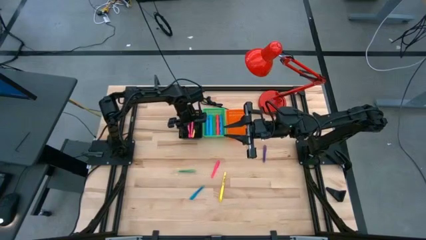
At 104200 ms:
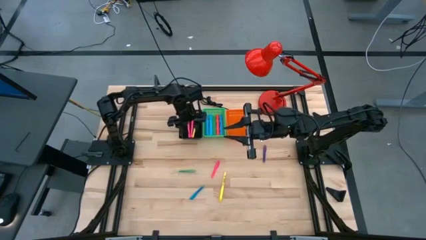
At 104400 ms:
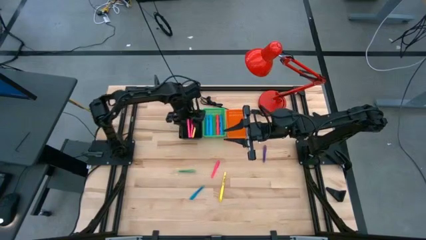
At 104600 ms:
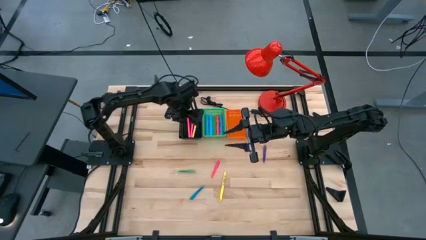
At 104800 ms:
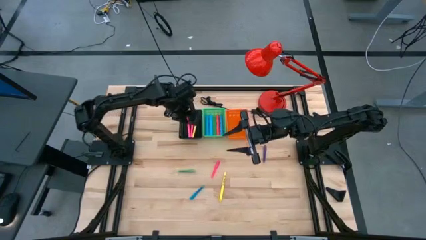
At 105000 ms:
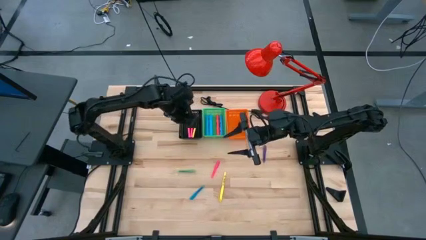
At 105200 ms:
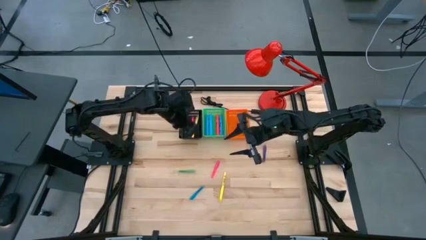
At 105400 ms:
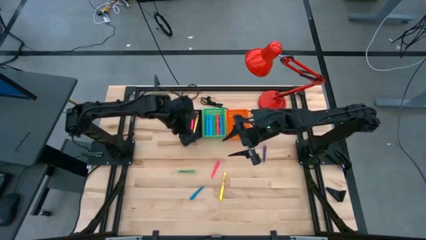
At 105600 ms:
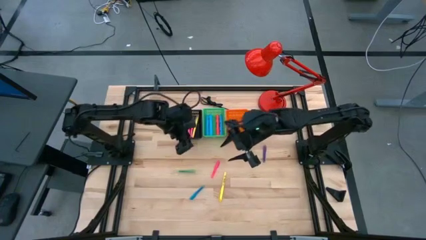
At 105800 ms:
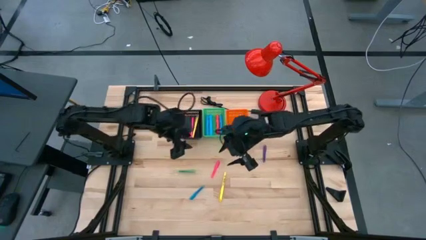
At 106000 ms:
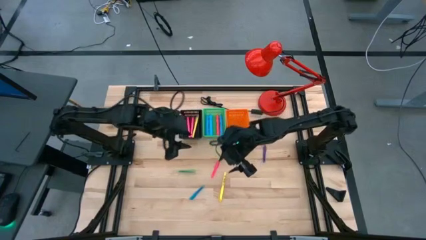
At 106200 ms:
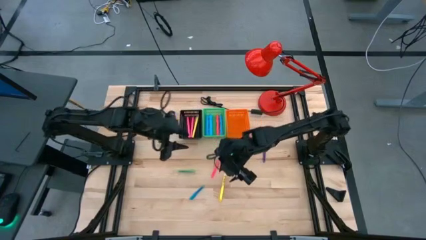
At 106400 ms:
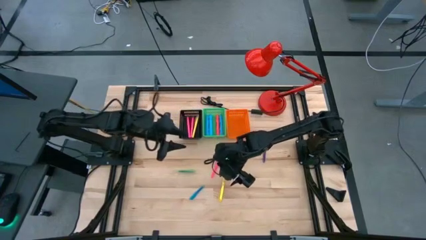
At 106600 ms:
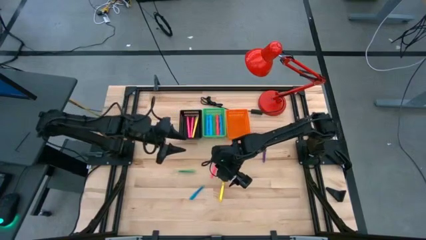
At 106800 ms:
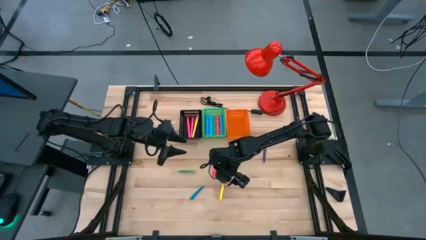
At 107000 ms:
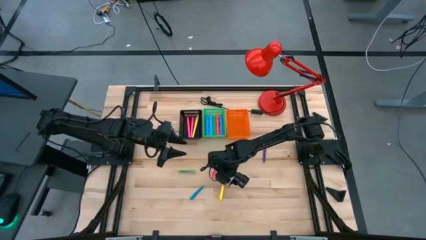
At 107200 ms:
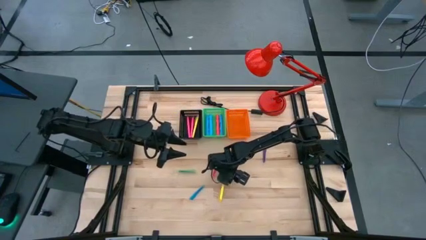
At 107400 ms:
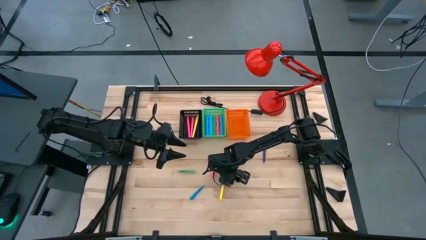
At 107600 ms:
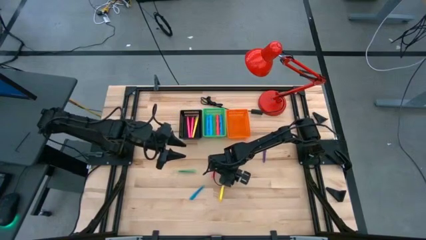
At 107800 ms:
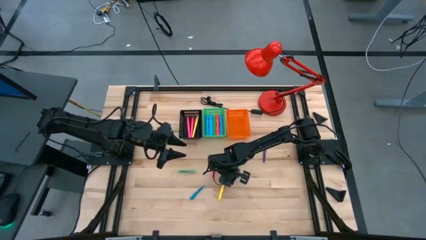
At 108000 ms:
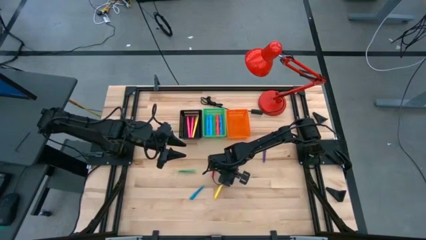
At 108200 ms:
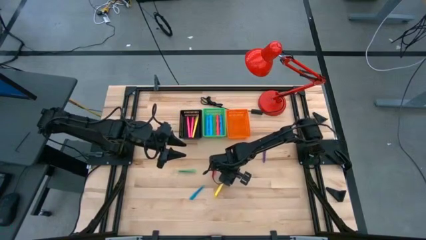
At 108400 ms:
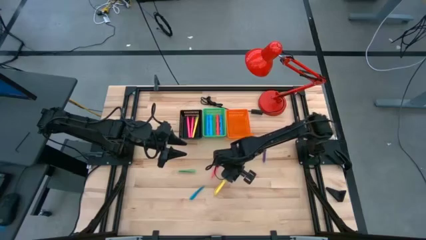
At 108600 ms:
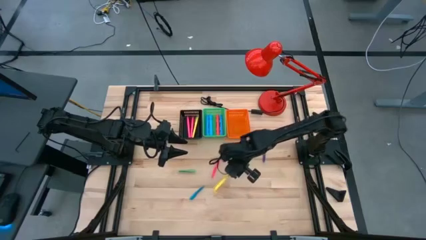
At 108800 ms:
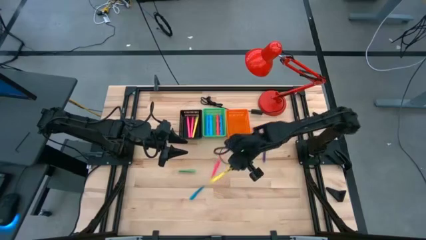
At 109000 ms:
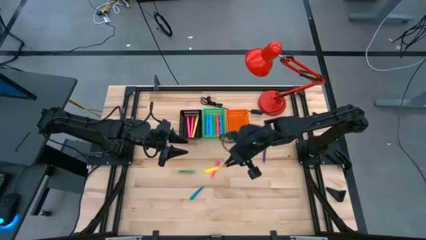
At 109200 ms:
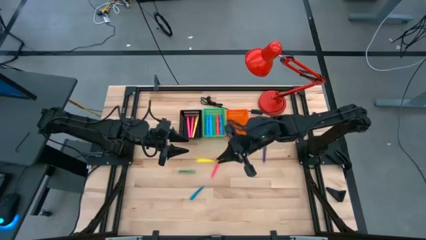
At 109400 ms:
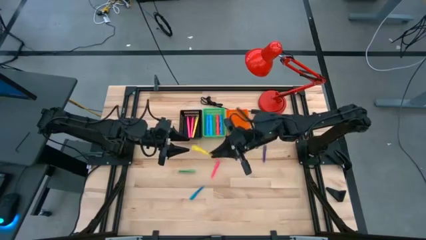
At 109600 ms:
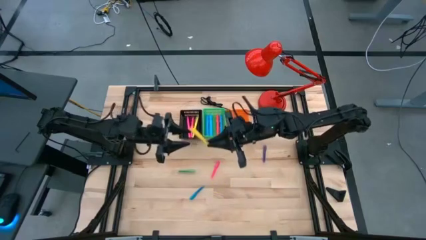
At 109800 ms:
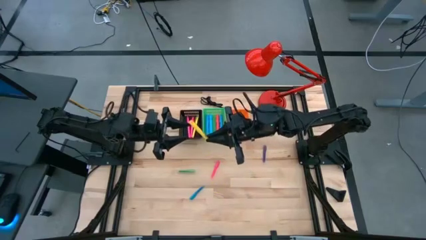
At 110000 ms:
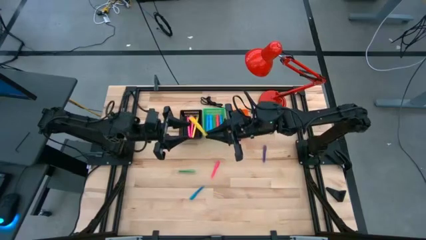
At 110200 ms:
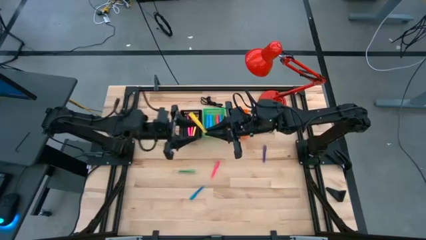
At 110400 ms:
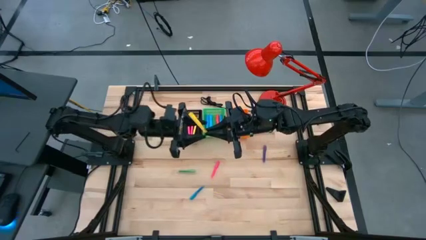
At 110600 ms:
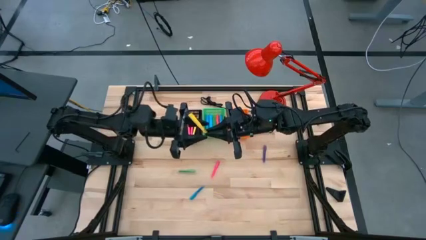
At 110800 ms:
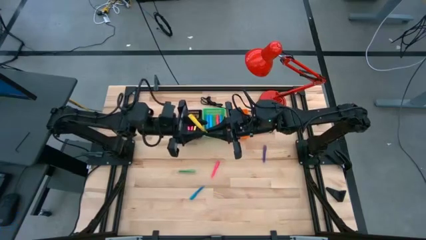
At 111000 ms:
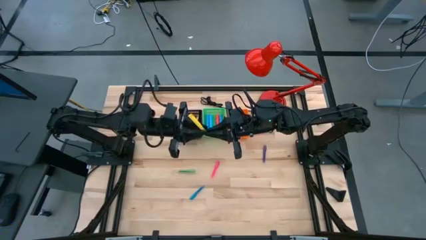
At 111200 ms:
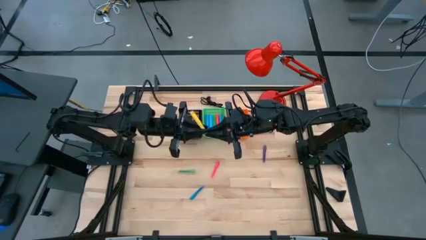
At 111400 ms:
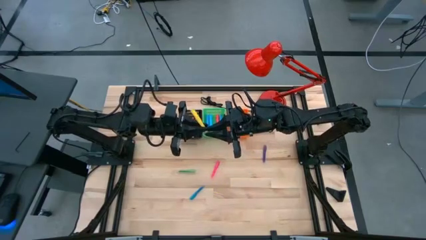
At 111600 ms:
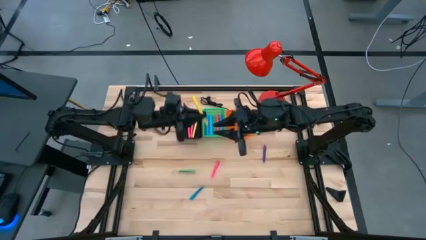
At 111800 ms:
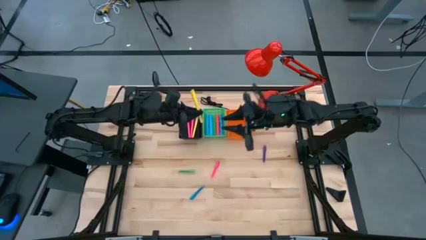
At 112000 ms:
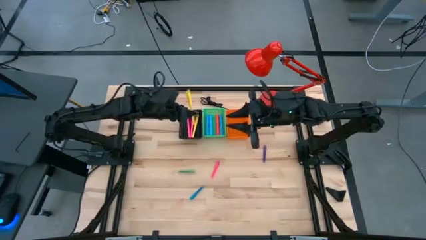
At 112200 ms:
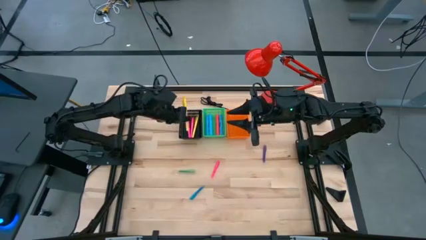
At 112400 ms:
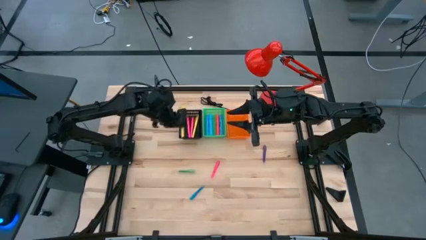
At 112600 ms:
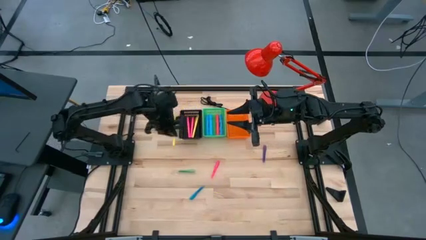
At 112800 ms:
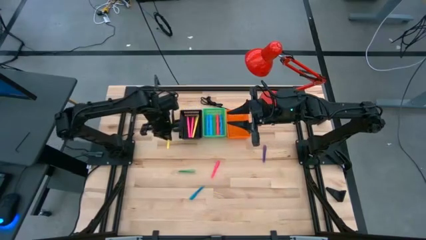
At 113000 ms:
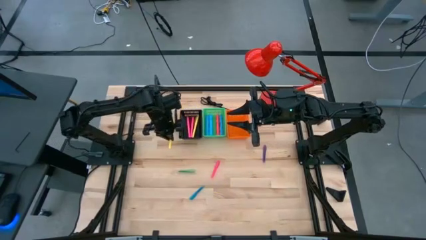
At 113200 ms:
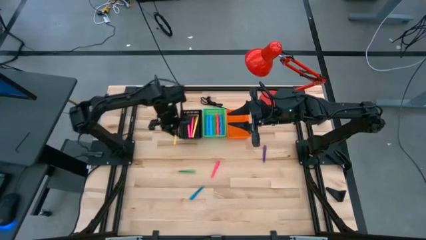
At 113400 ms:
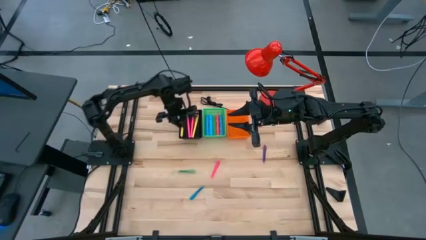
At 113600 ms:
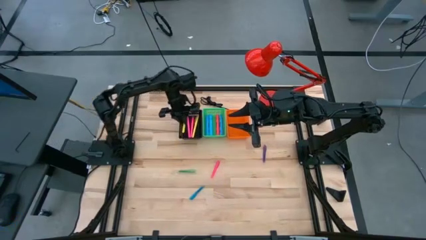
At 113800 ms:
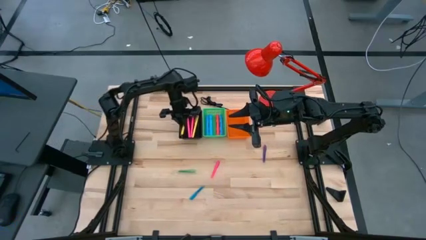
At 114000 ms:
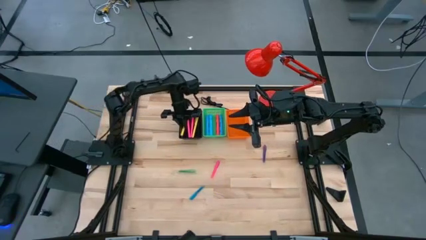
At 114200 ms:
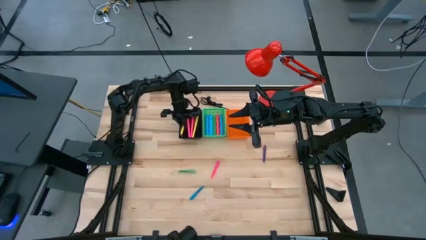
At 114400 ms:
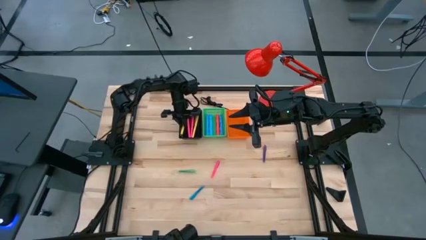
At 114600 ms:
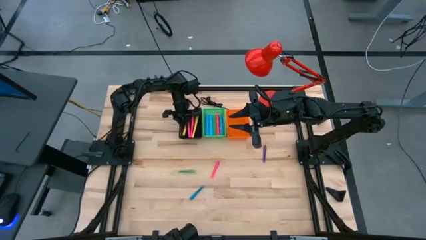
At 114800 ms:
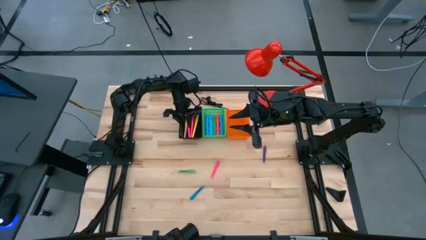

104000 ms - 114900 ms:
Task: Pick & Place Markers
Put the large yellow pen into the black bin

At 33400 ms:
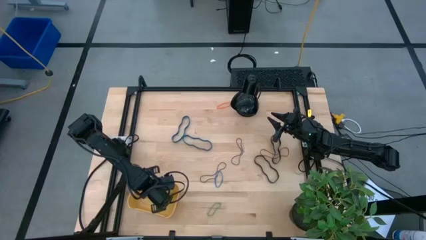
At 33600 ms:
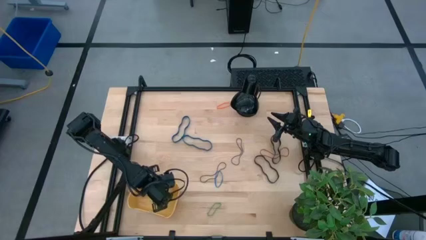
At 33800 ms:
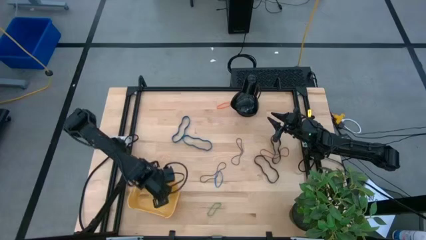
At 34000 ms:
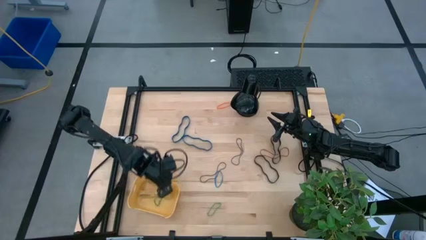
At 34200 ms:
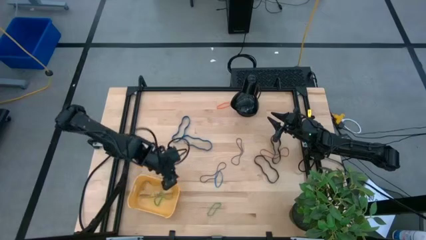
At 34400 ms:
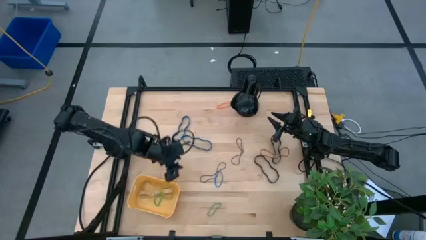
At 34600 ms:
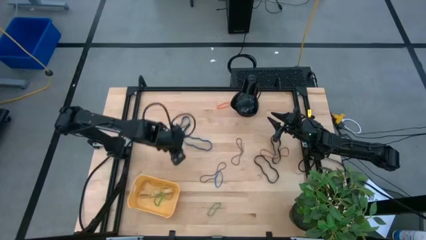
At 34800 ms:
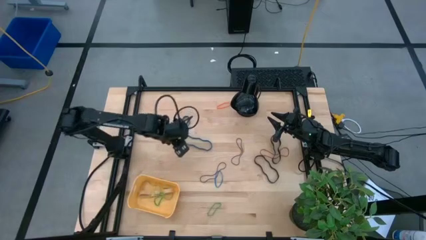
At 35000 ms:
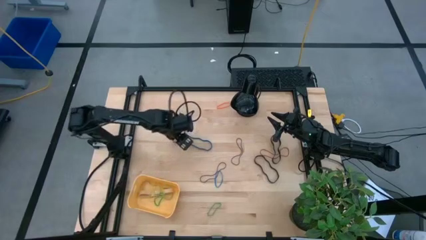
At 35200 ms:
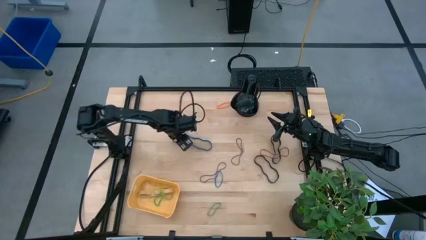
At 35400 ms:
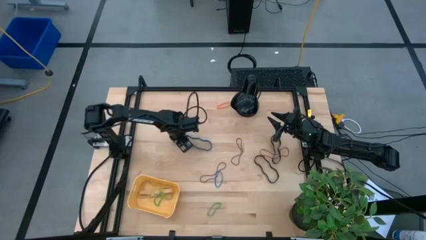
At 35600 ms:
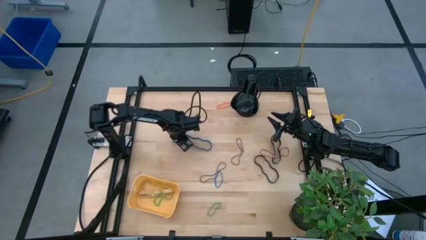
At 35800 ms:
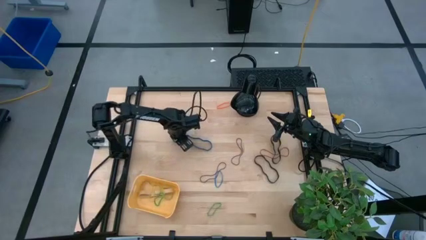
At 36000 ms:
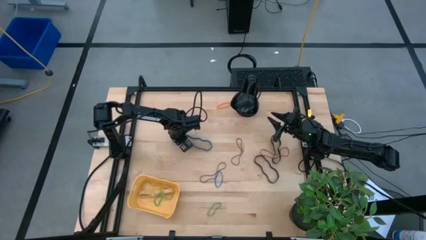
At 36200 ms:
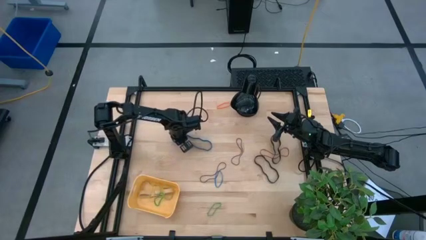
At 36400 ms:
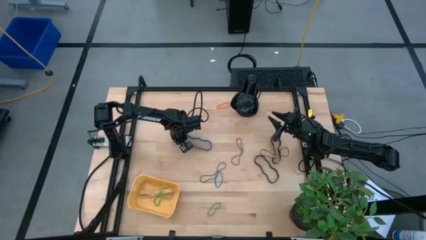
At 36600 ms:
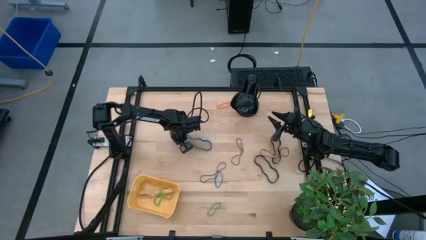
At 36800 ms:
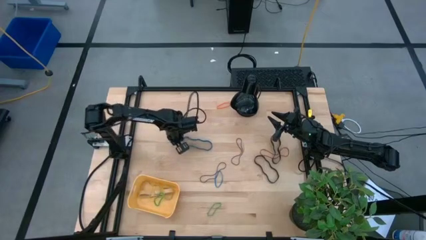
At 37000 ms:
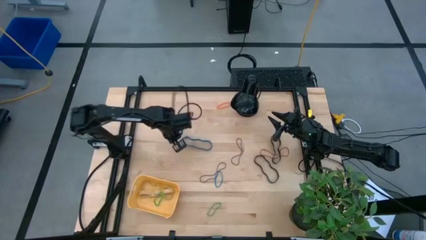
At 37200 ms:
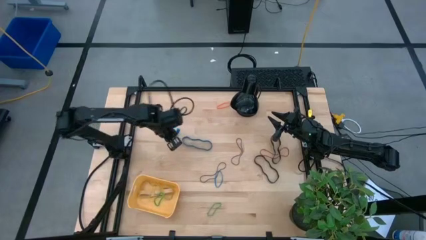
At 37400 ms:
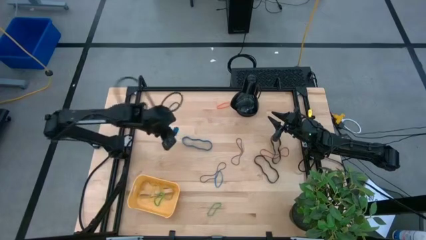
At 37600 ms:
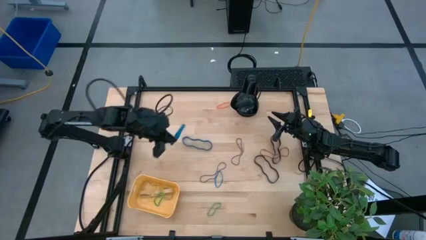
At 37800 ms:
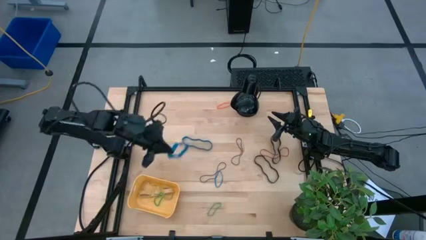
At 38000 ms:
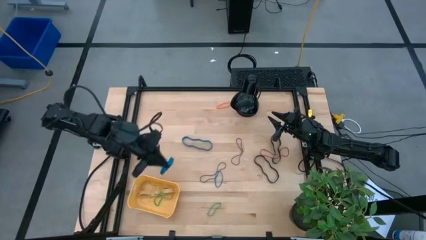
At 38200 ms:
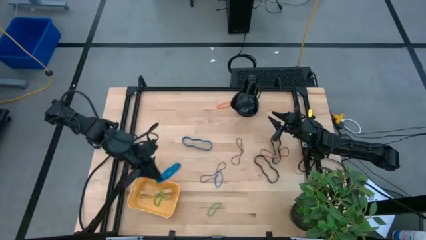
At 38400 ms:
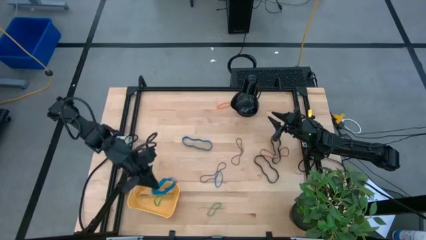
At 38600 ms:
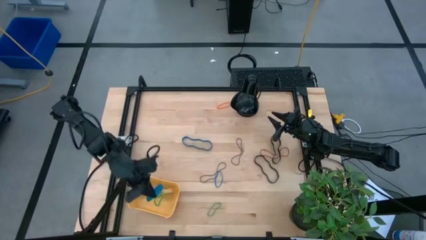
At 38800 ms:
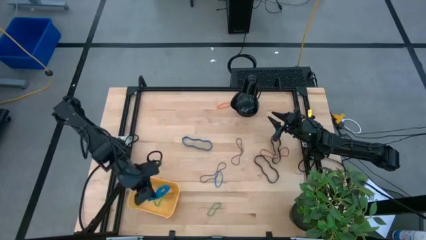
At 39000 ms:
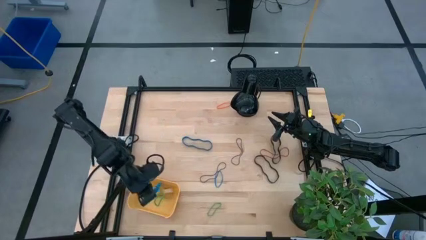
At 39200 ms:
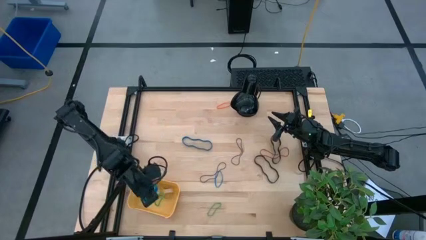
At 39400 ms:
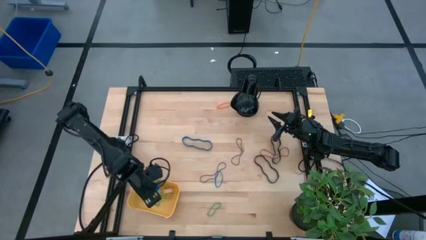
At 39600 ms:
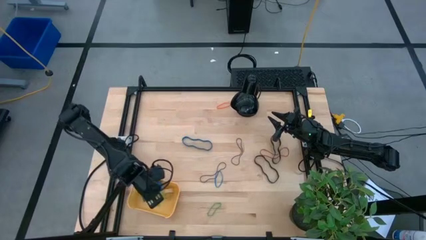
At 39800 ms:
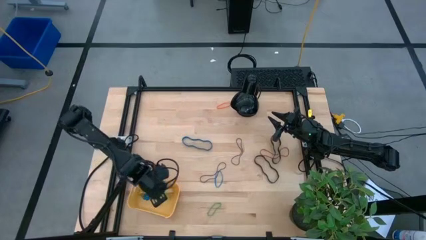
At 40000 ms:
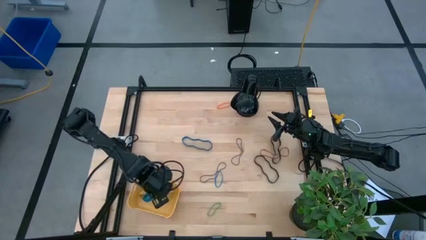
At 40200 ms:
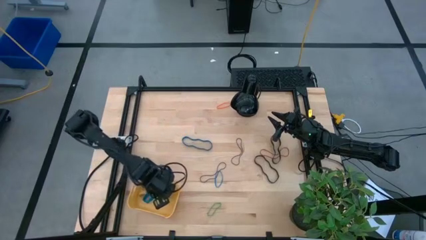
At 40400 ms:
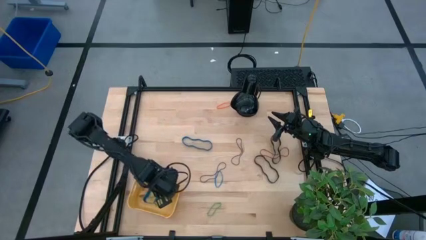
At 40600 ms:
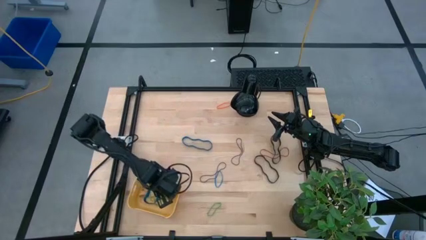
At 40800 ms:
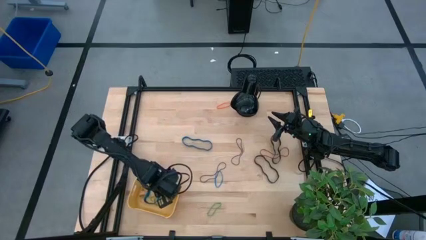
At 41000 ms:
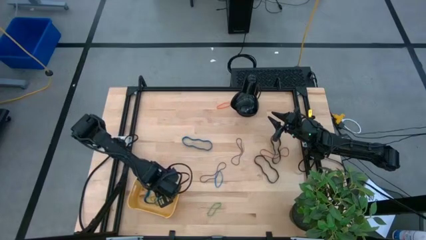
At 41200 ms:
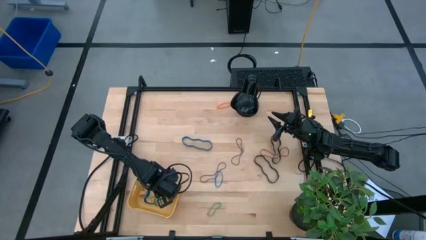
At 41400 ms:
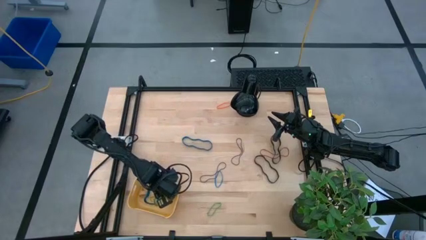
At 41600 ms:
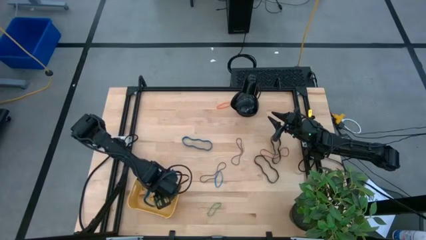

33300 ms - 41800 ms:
Task: Pick and place rubber bands into bin
Put the left blue rubberband into the yellow bin
